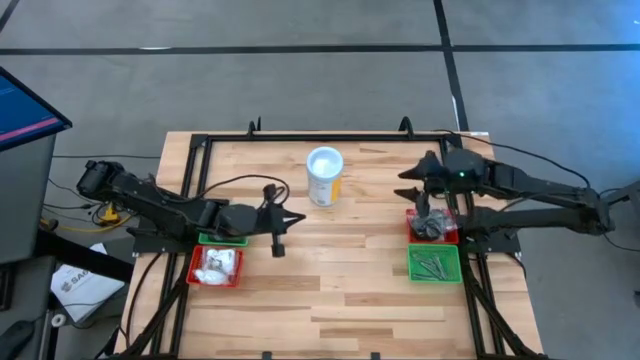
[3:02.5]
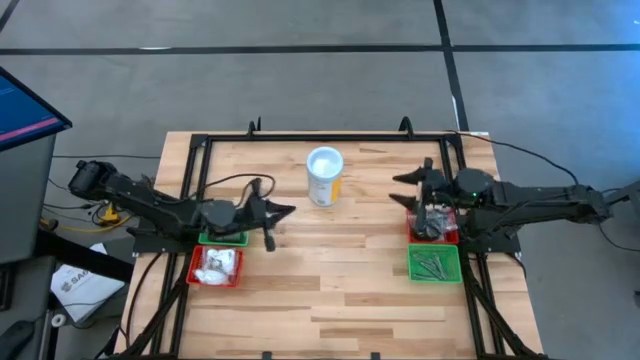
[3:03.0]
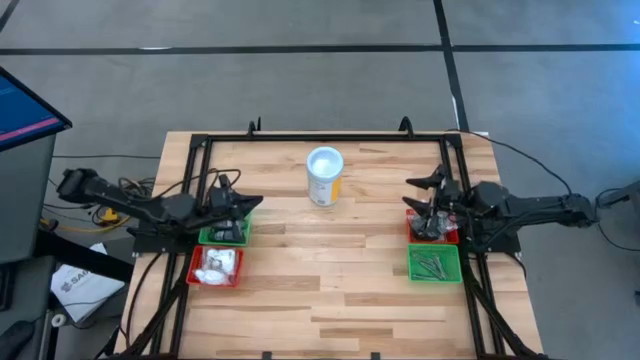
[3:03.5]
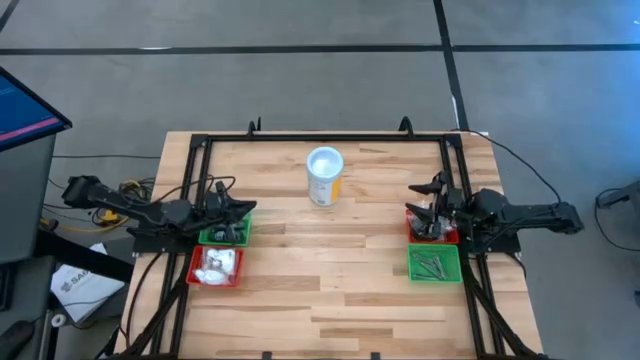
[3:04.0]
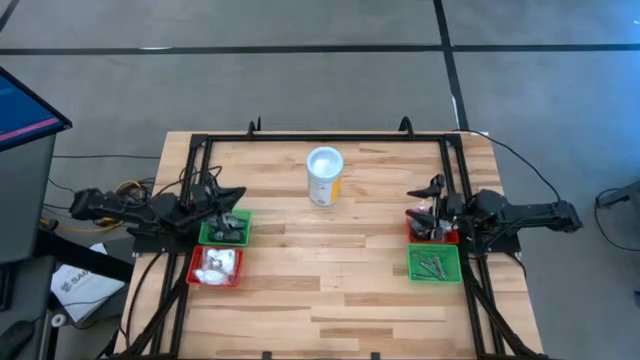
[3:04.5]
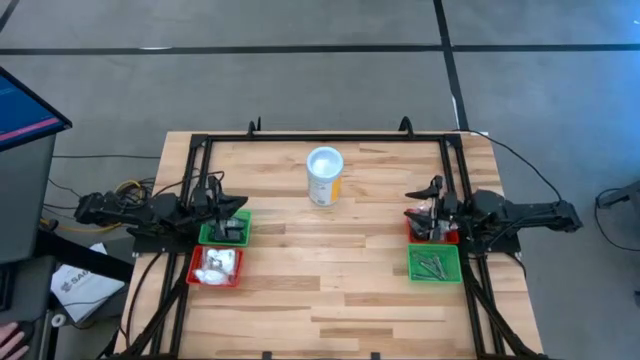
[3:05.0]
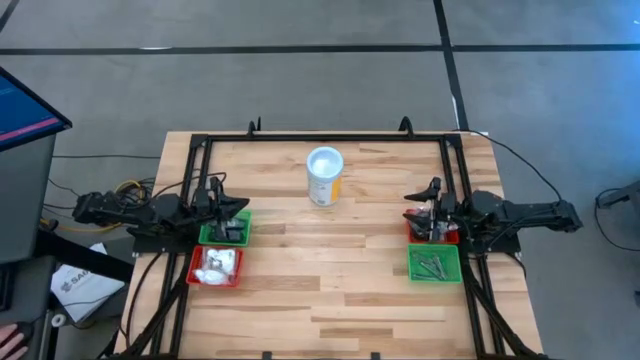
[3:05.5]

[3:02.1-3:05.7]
Task: Pick & Place Travel size toiletries
Return to Home Position

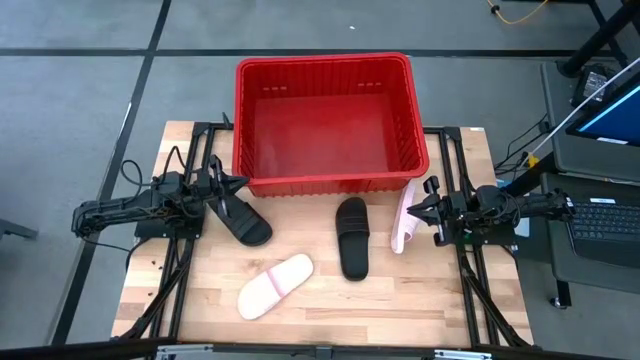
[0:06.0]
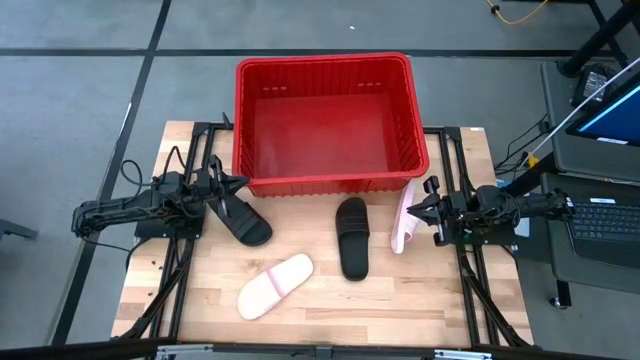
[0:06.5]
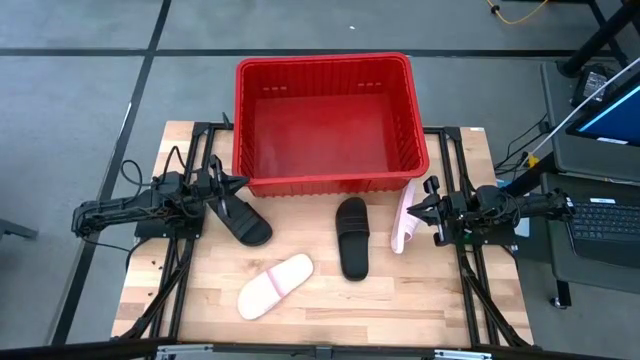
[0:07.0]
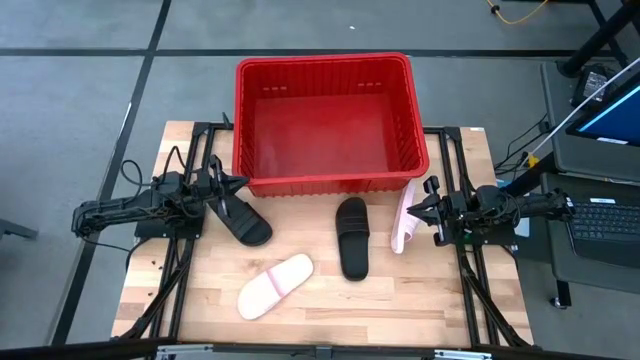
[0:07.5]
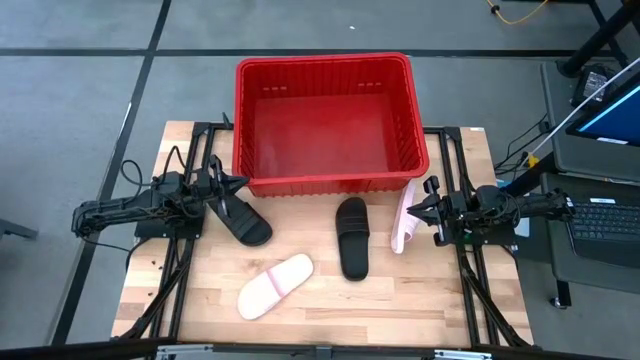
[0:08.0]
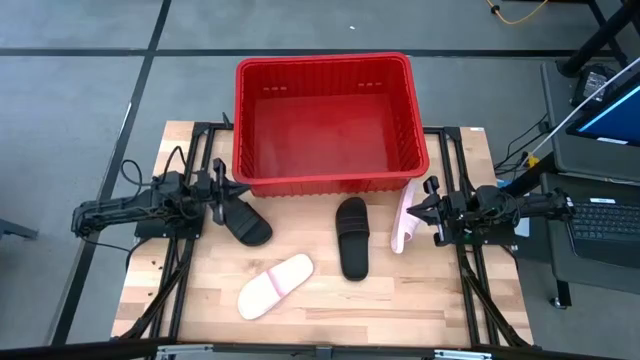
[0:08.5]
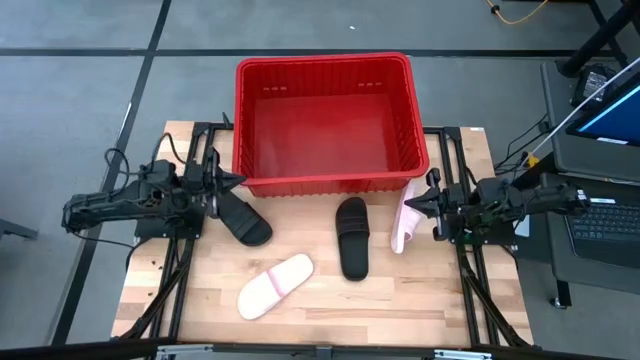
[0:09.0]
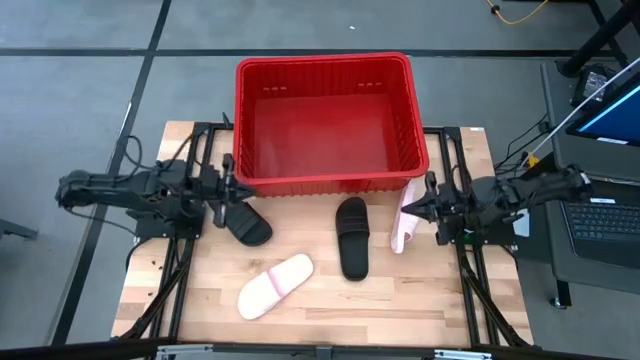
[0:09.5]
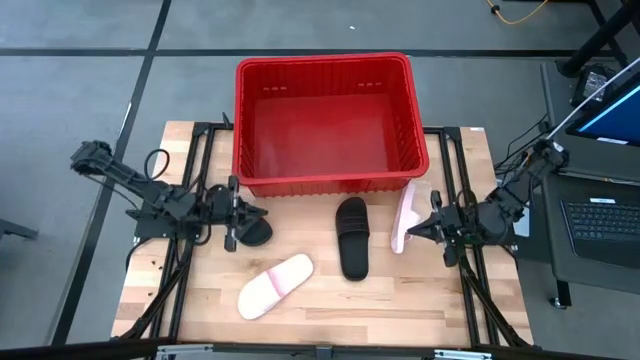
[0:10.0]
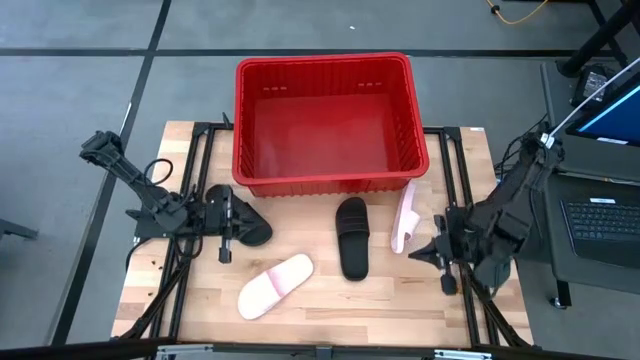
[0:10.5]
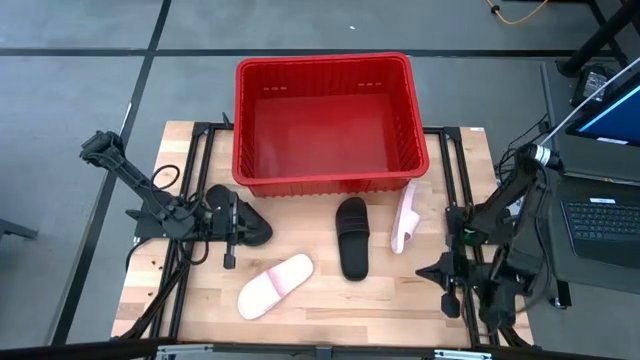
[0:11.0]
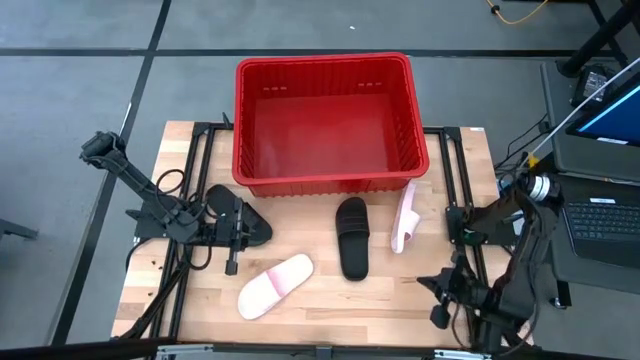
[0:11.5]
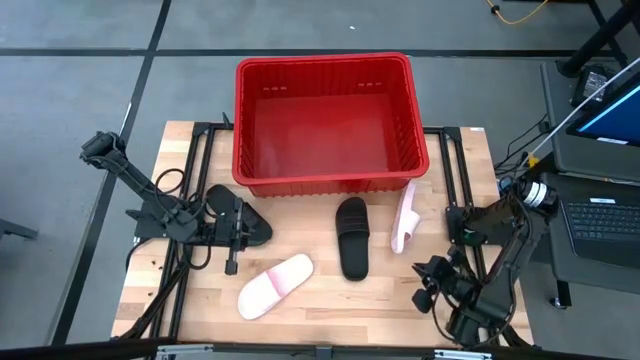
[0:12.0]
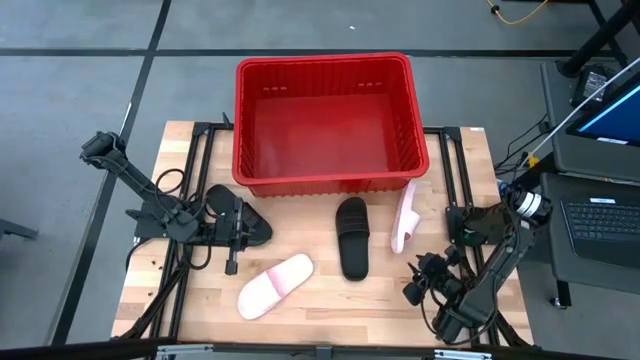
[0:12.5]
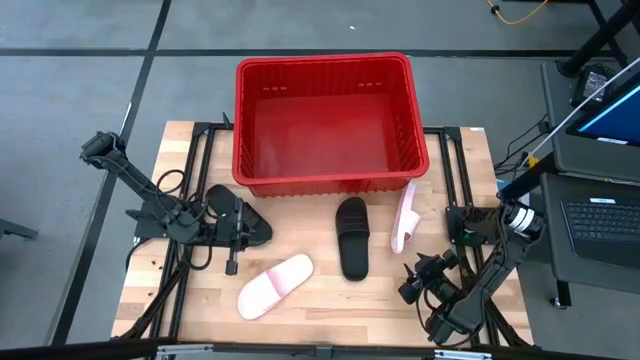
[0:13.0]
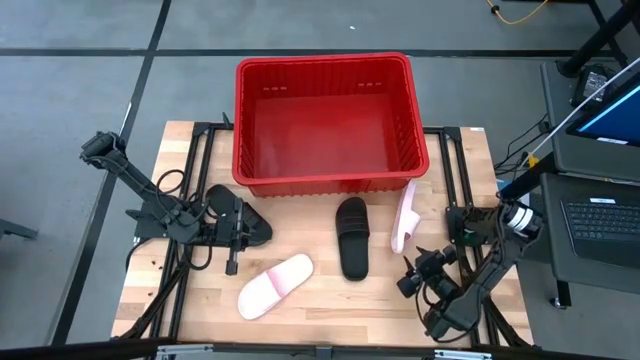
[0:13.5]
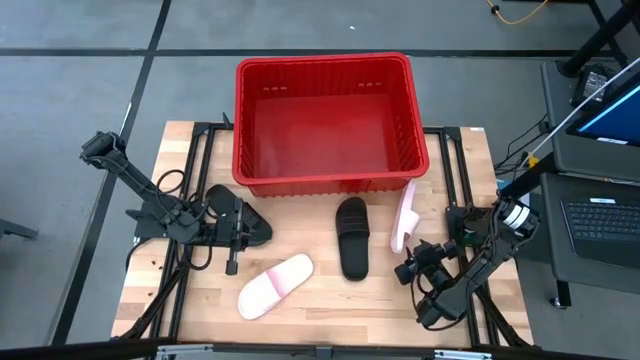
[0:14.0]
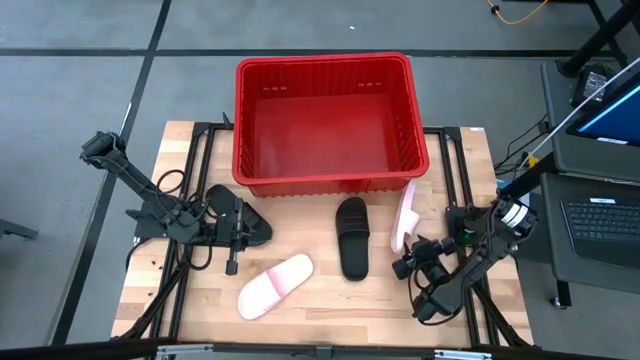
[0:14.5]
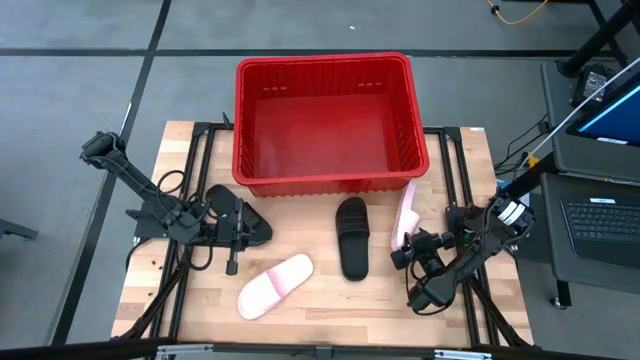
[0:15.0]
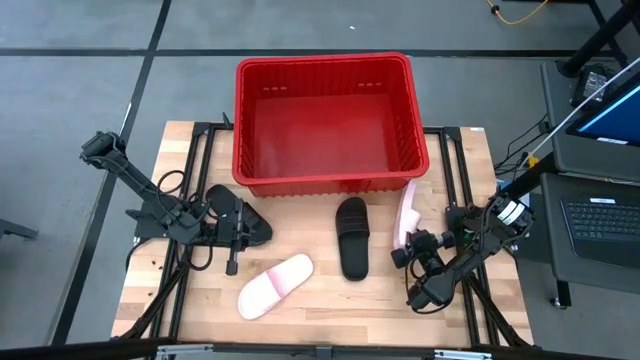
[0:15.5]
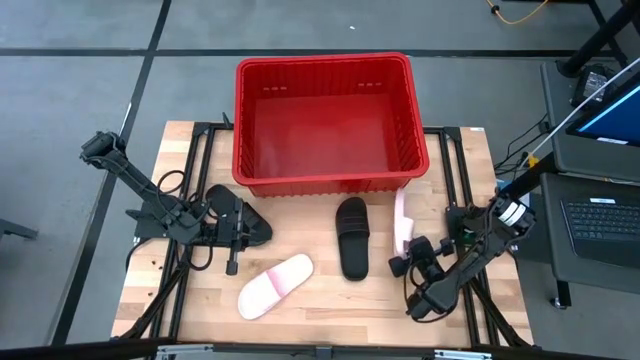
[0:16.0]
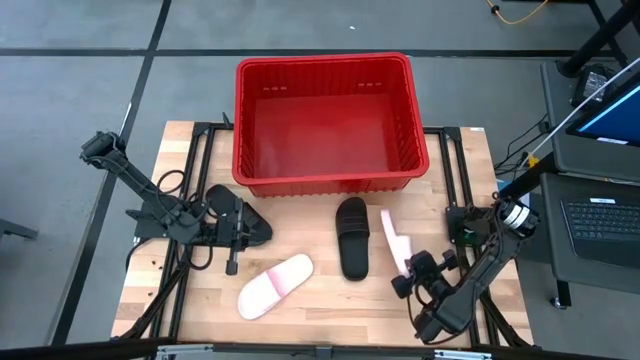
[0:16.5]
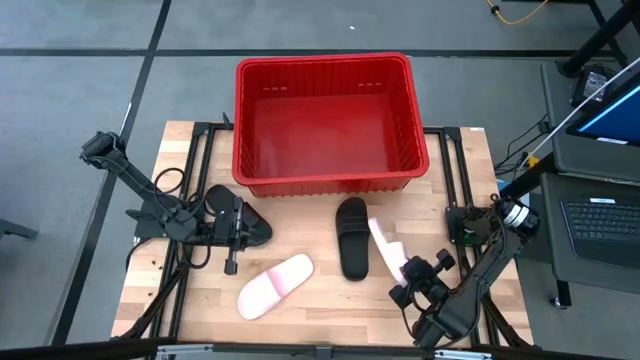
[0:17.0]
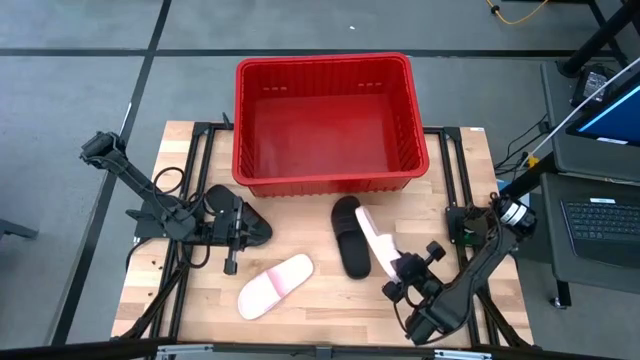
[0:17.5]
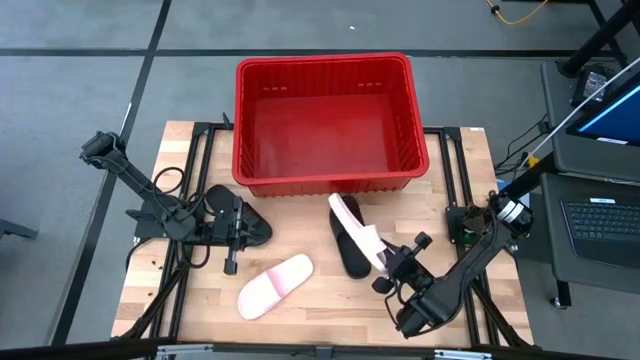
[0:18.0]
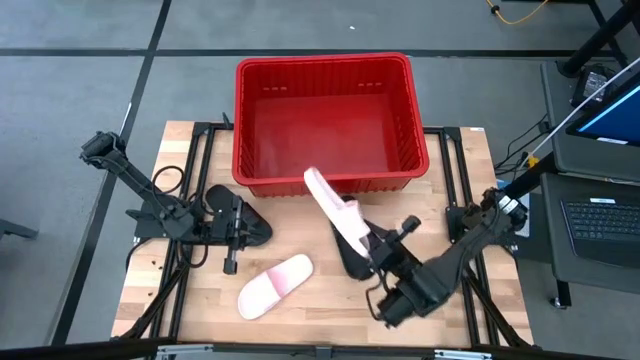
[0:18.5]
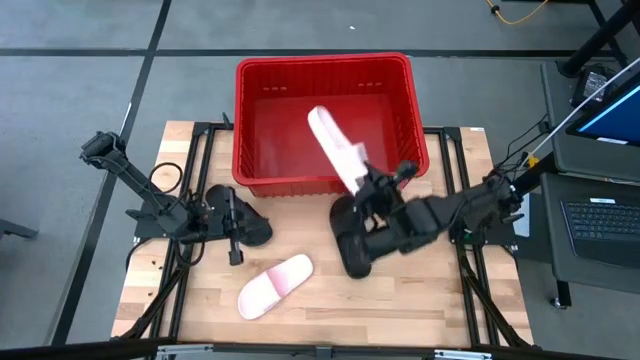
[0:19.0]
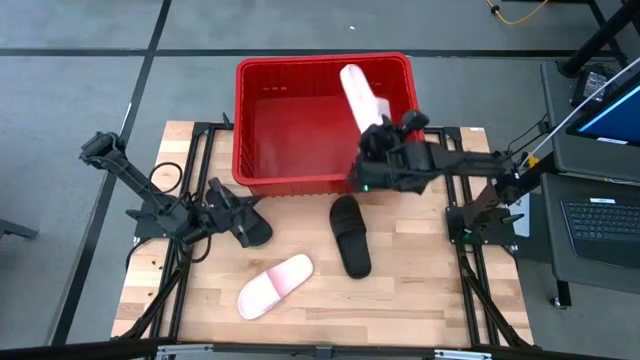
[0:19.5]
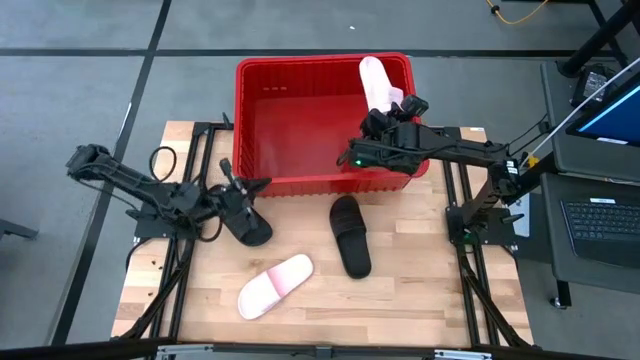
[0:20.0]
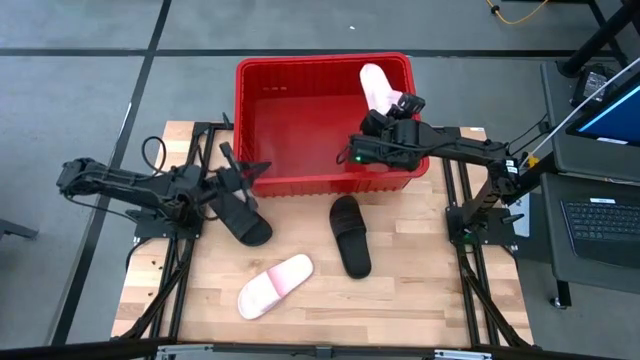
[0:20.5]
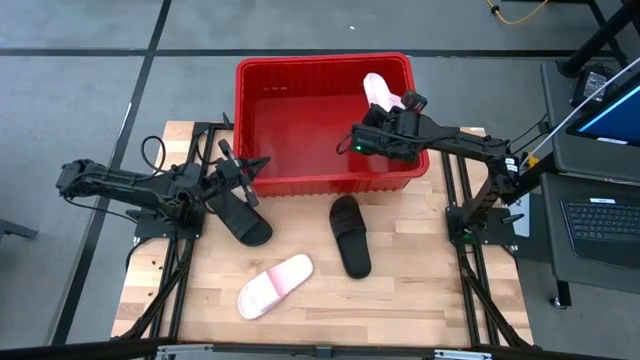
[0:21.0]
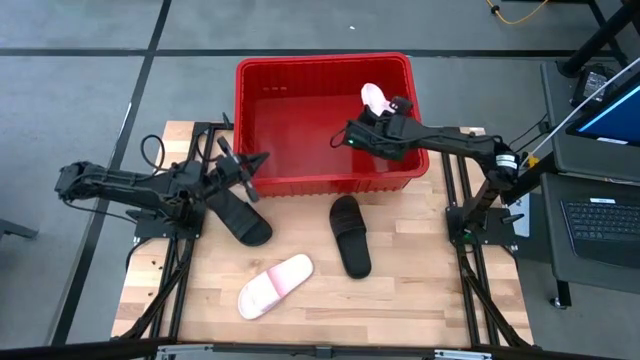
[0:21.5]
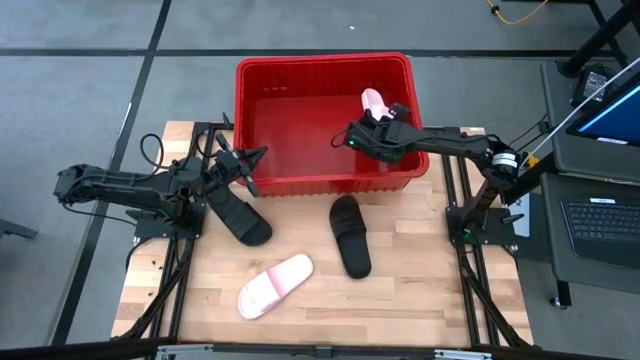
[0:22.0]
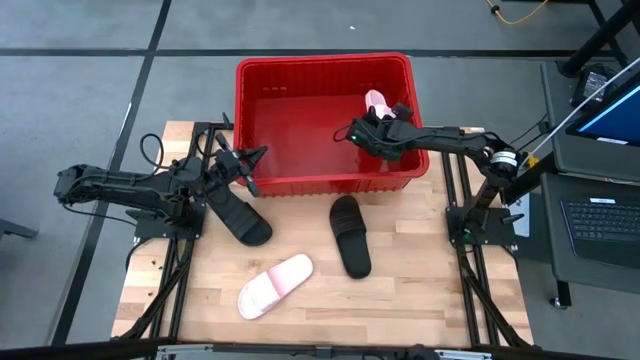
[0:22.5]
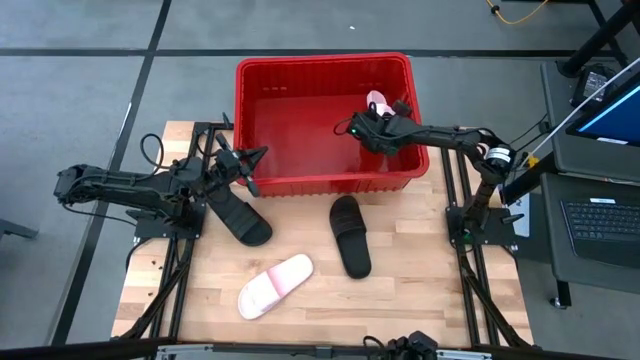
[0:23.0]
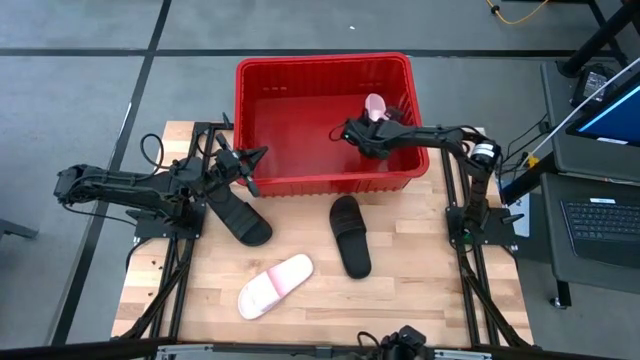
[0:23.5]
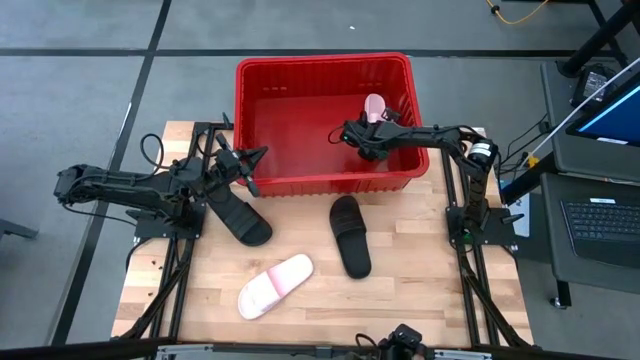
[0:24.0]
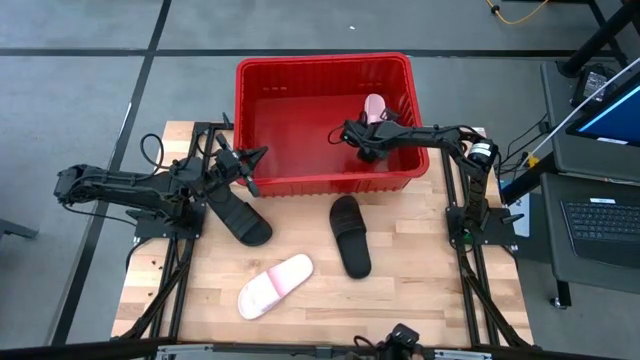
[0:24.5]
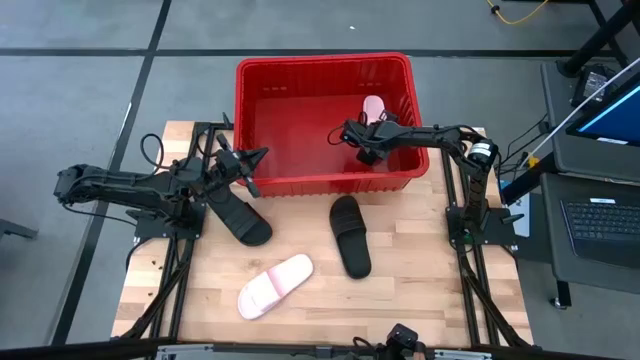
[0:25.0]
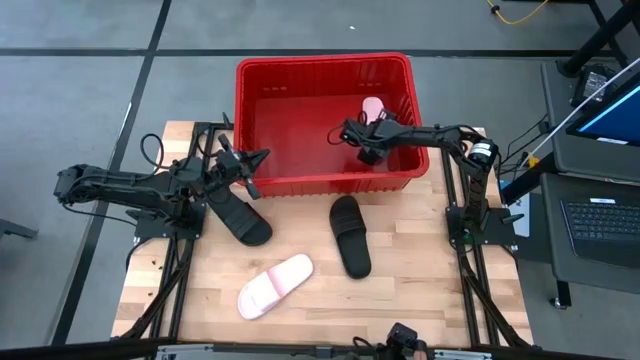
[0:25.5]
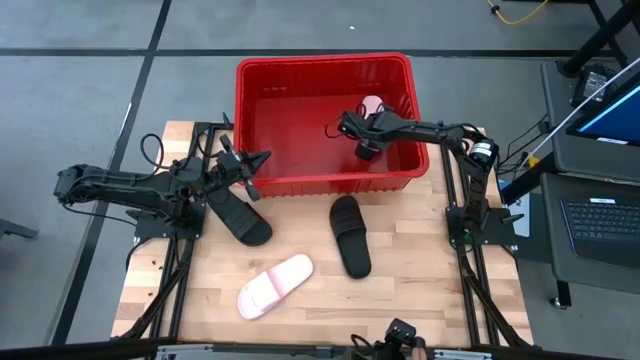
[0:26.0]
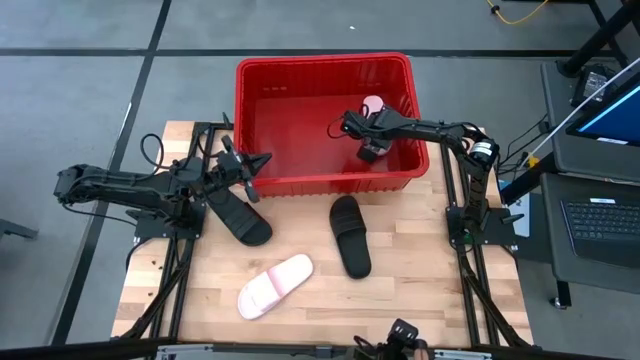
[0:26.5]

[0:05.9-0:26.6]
Task: Pick and place slides into bin
Put the right pink slipper into the red bin
